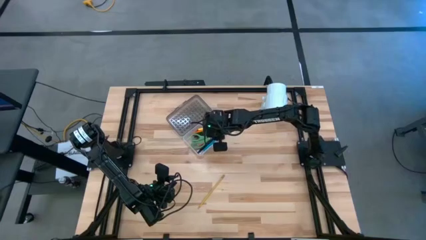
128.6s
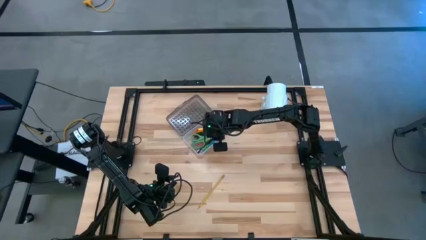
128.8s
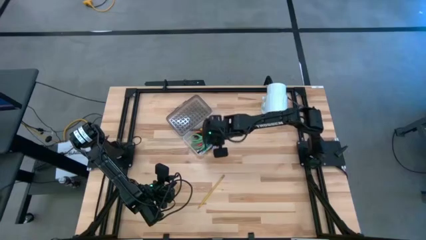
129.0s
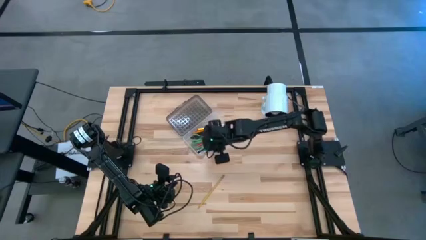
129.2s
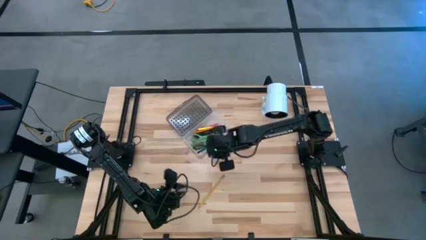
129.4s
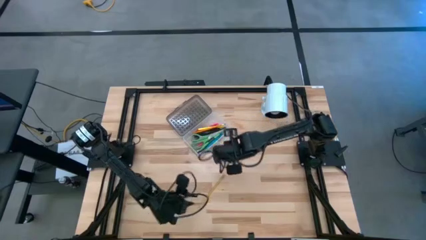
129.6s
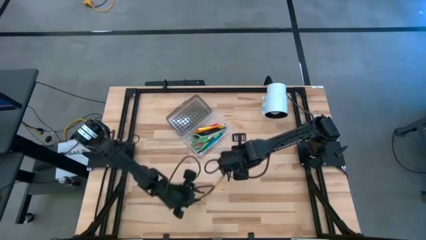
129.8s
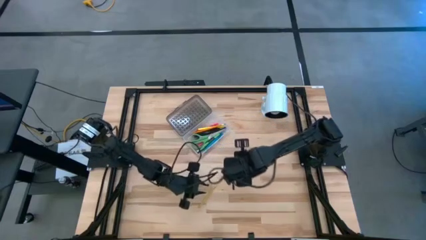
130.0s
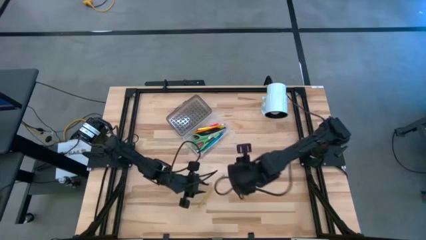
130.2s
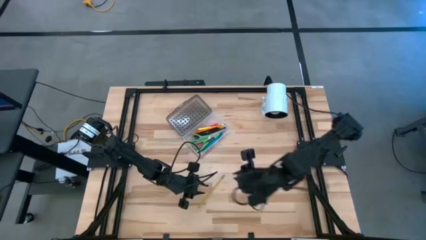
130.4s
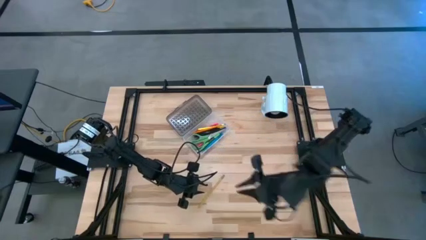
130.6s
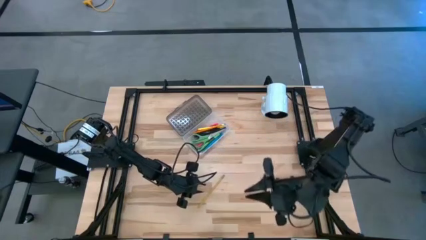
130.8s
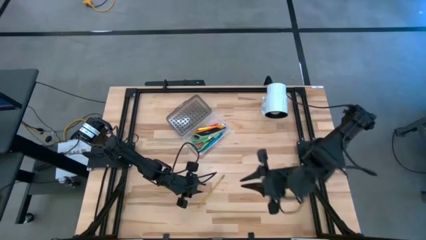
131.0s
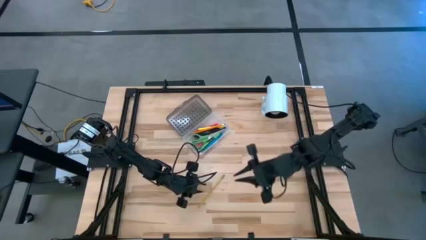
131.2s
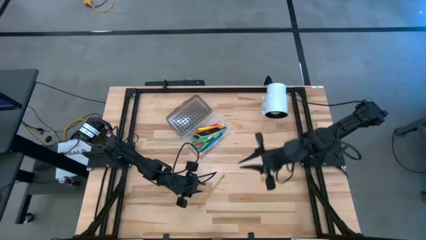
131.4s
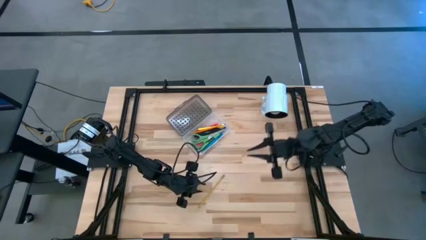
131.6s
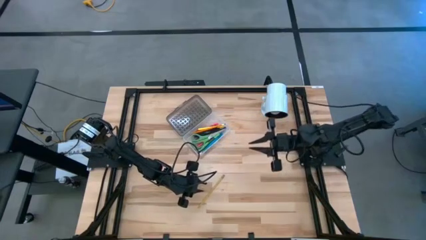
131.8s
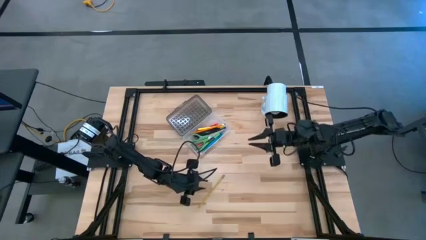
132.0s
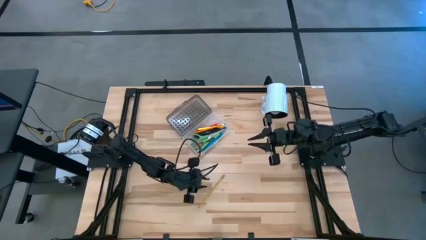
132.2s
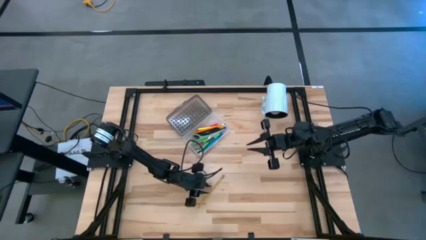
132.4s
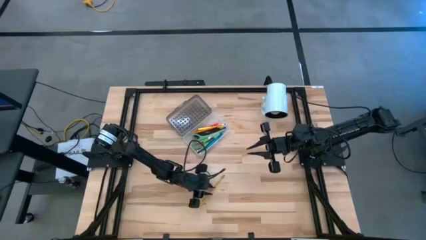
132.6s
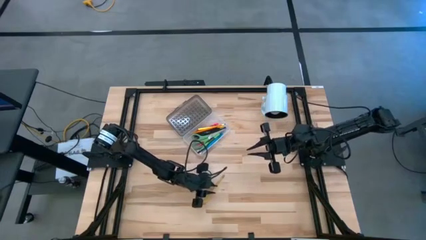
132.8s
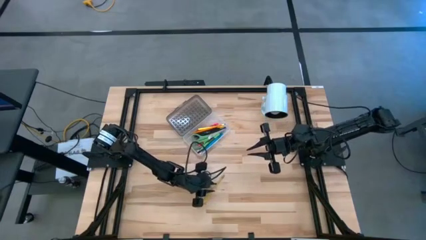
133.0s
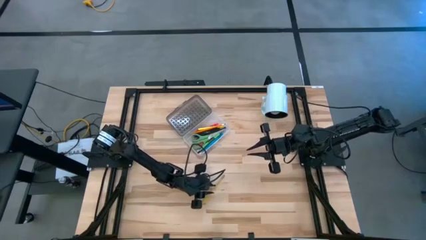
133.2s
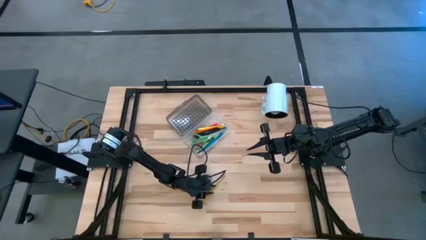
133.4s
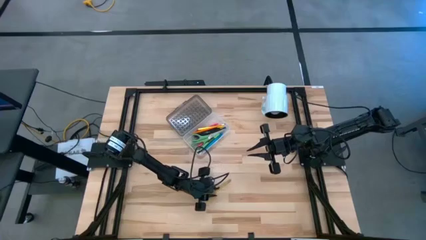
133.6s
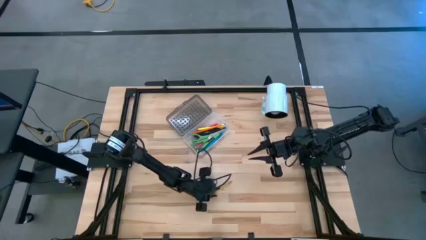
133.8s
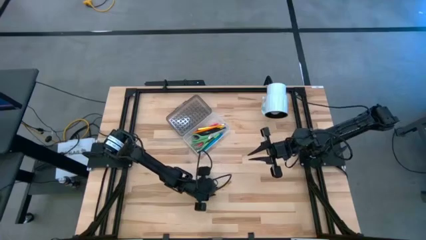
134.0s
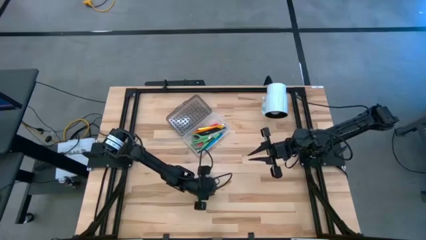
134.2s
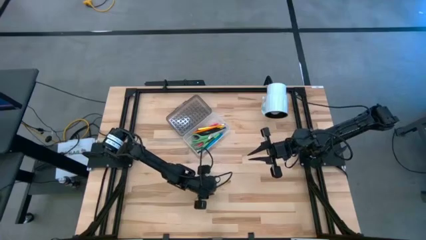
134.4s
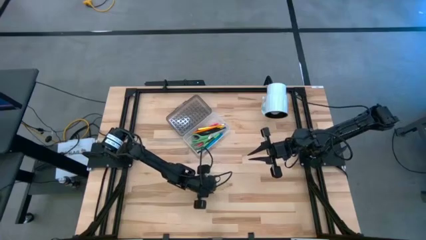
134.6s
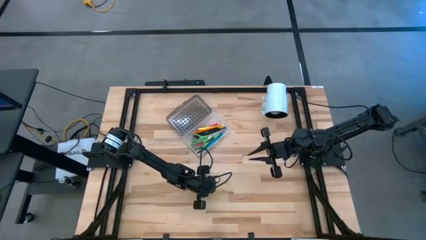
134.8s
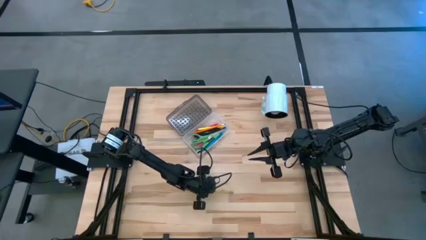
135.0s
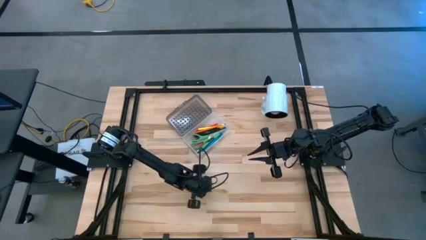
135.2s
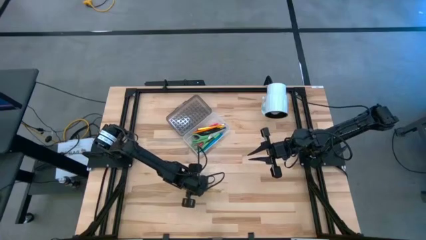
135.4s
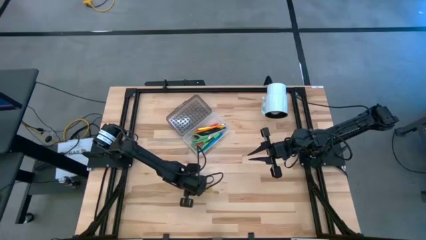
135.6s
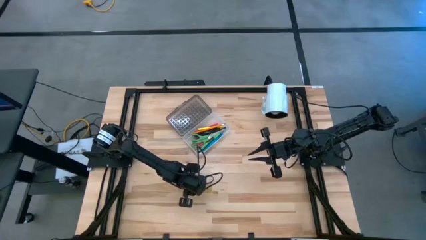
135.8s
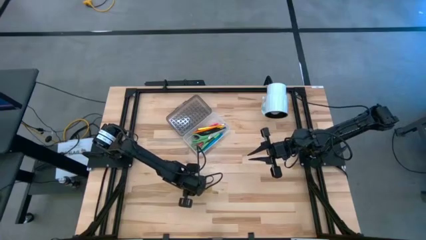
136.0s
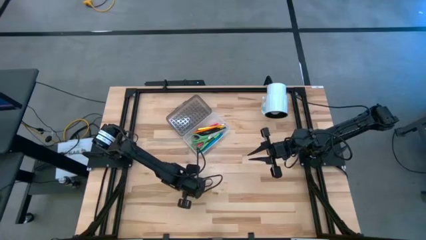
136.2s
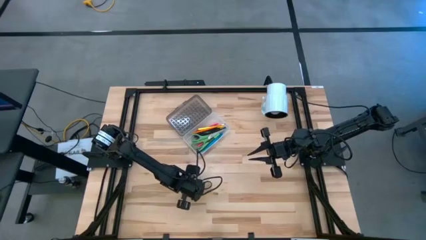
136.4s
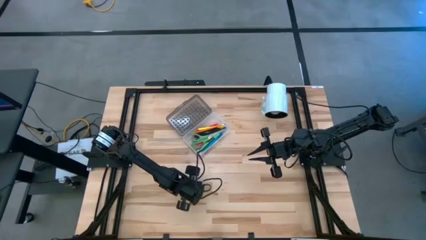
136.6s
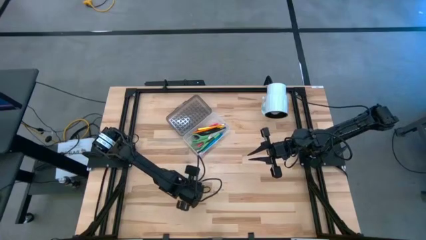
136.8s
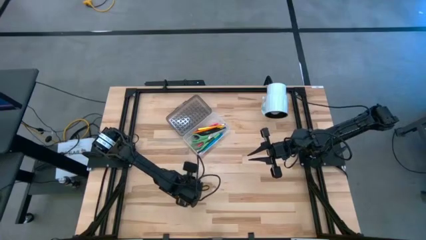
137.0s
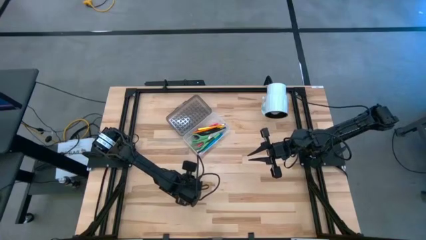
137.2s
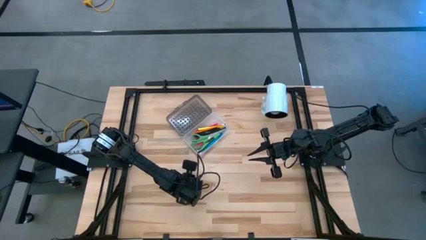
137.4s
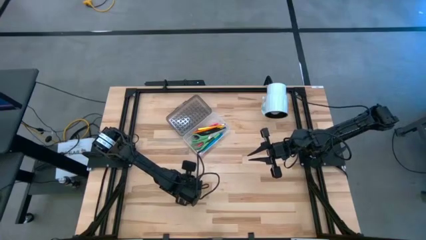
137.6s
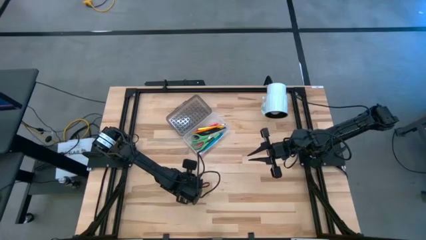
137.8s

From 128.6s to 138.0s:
Task: Pick & place school supplies into a supply box
Put the yellow pencil into the transparent supply box

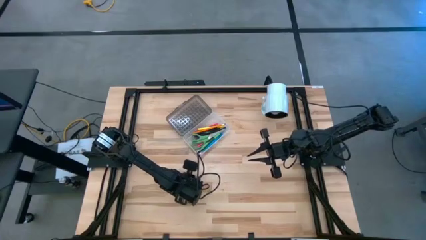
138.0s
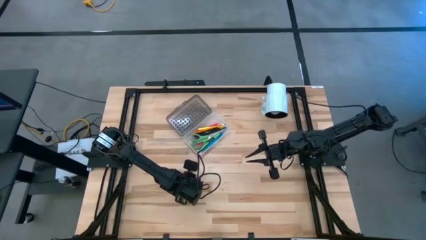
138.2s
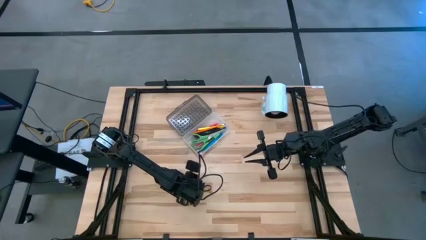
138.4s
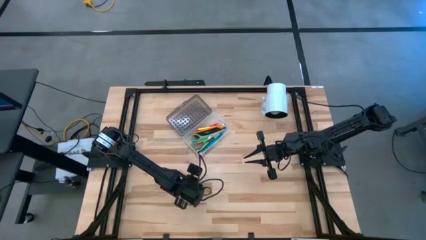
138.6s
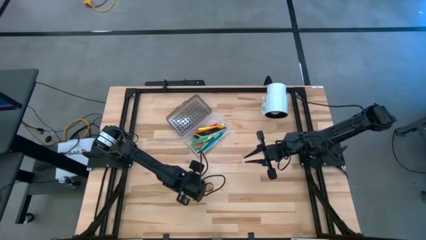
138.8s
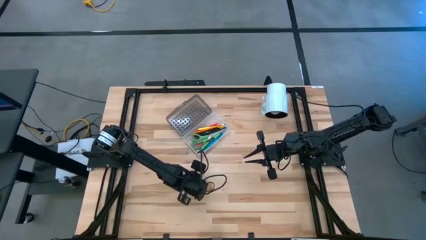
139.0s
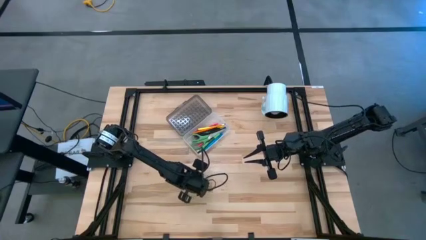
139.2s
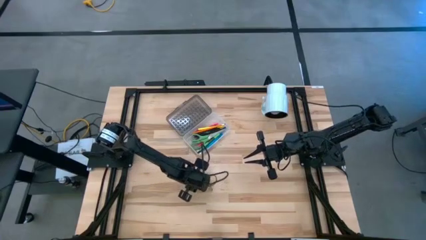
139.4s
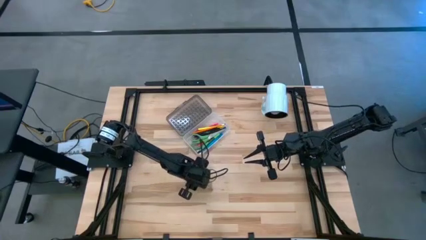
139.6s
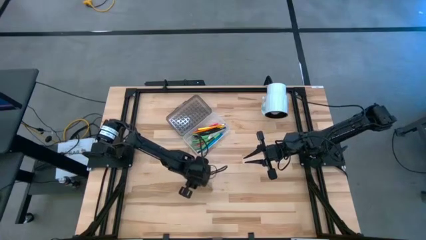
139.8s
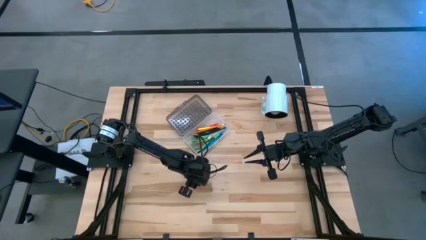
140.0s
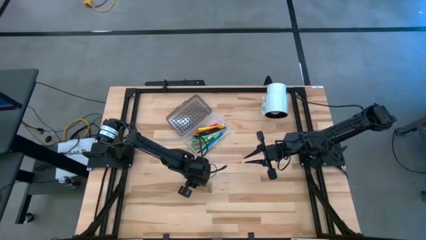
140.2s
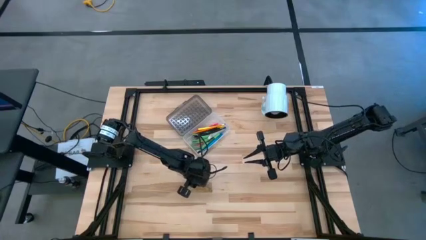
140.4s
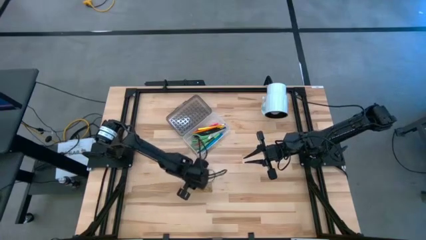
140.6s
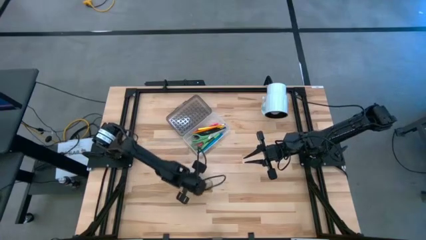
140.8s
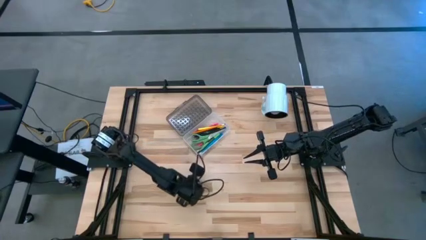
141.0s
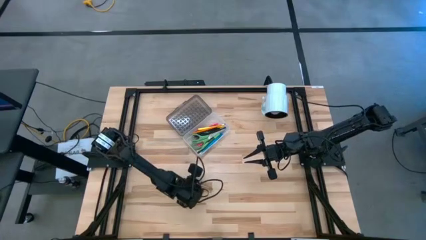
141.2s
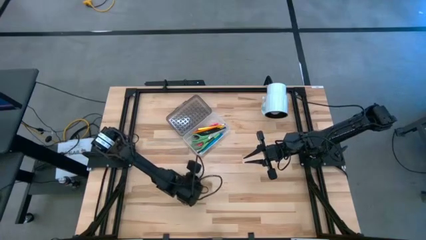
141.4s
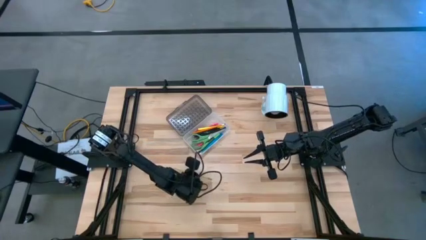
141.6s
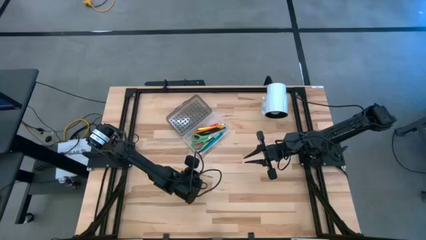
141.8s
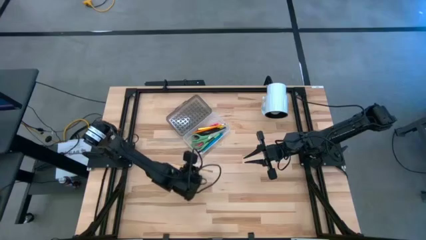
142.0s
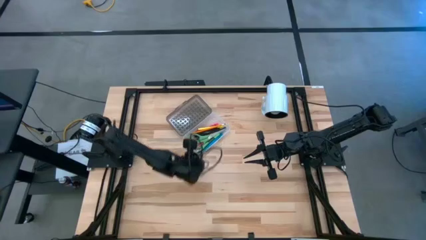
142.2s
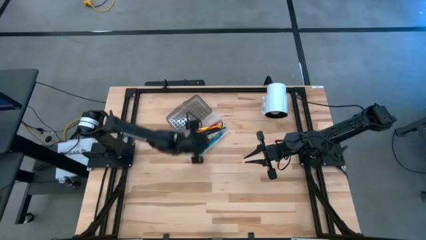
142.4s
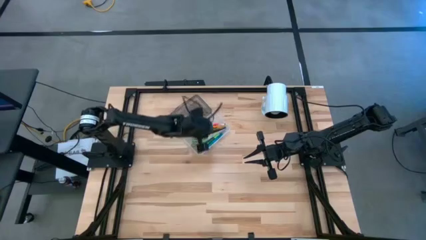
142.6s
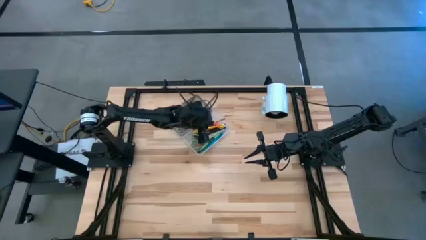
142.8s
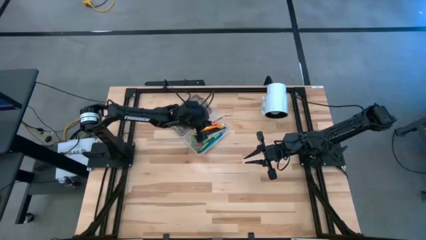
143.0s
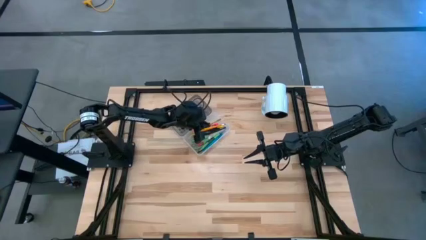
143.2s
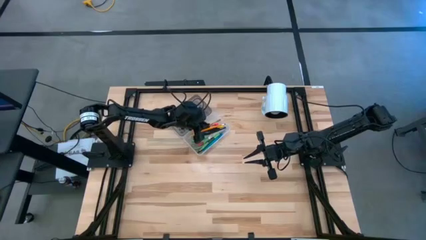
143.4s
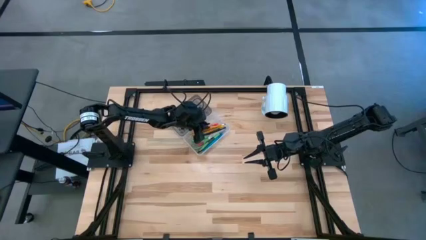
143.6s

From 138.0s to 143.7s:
Put the yellow pencil into the transparent supply box
